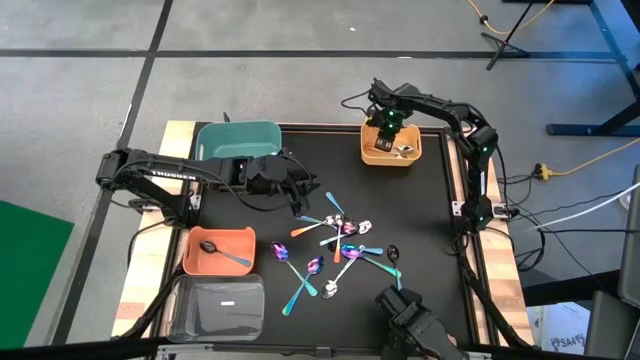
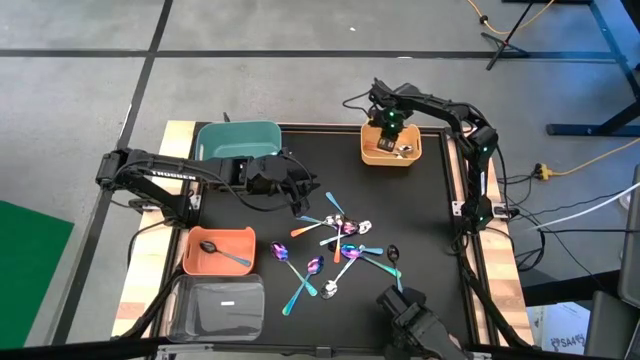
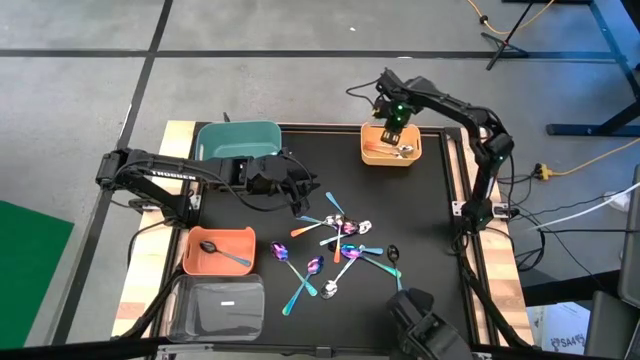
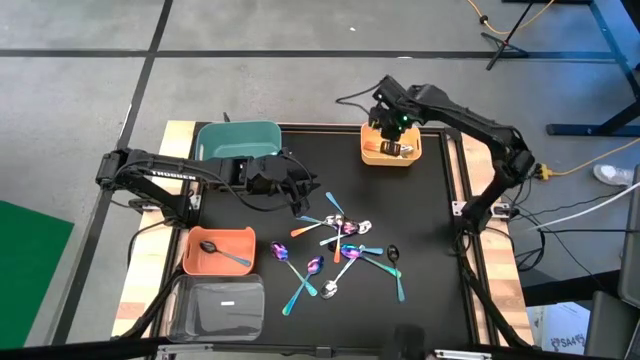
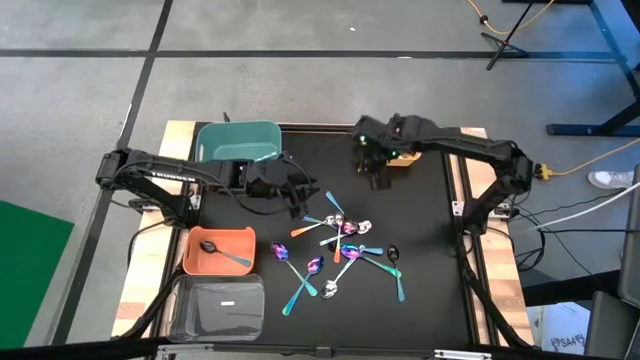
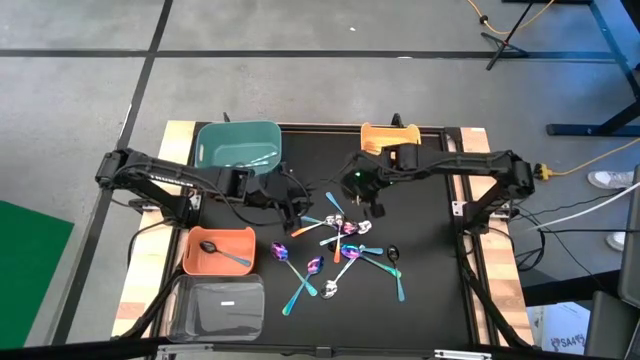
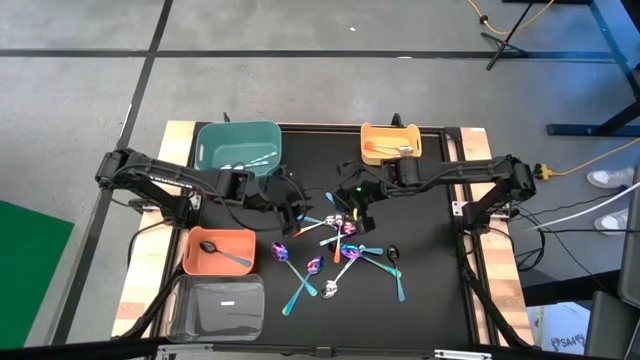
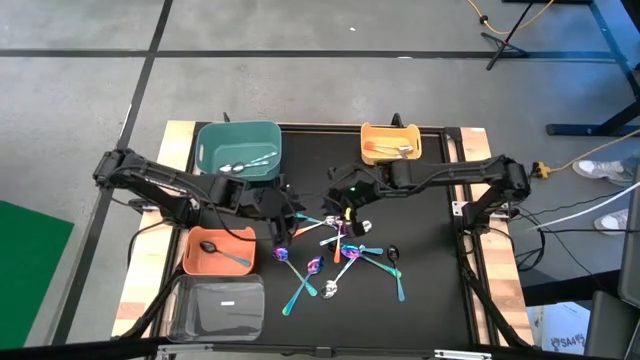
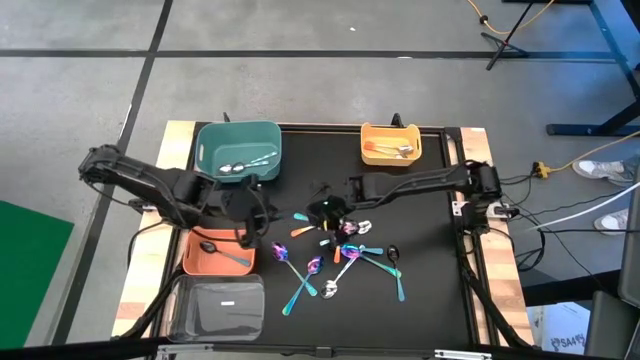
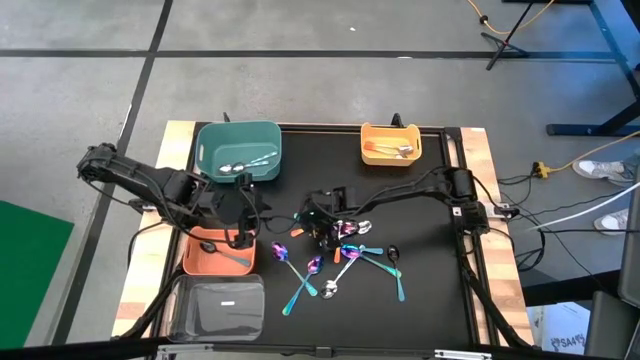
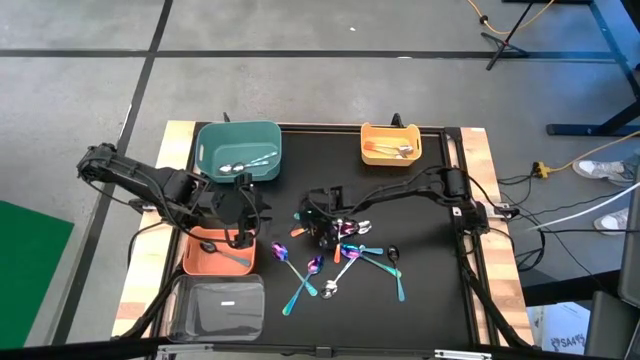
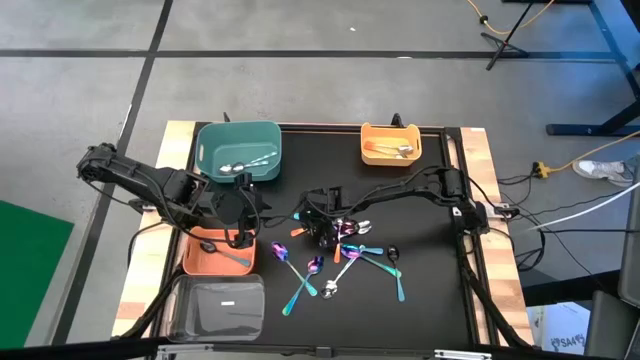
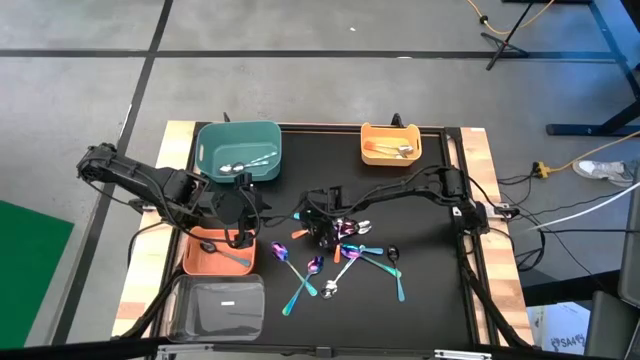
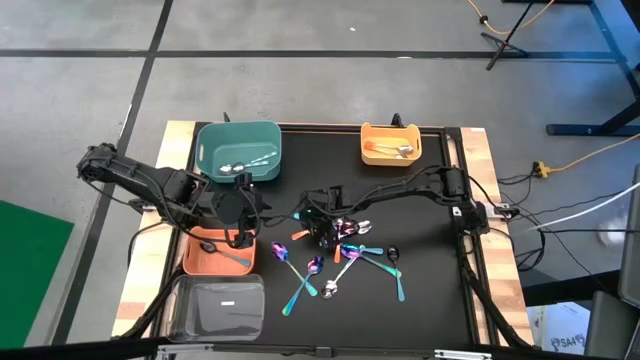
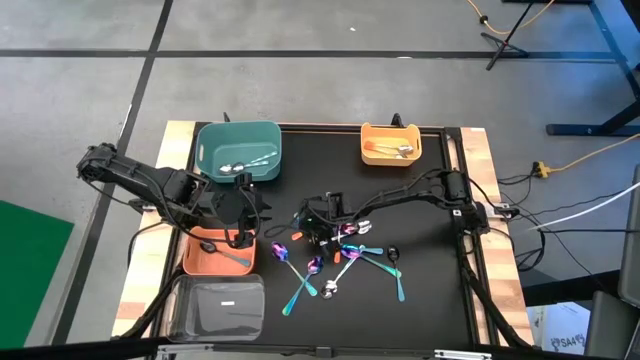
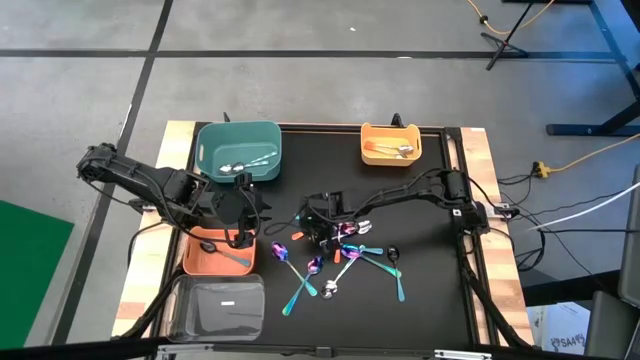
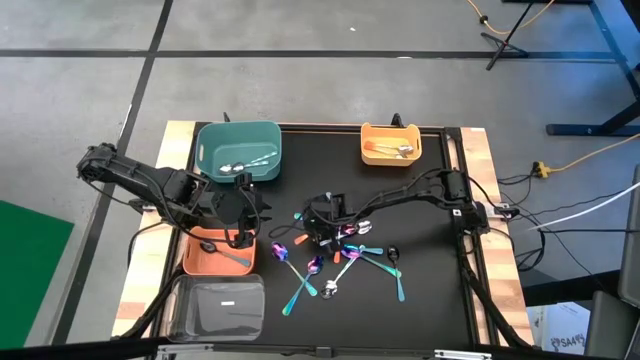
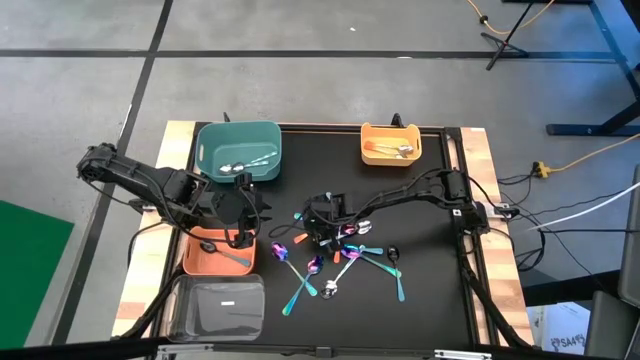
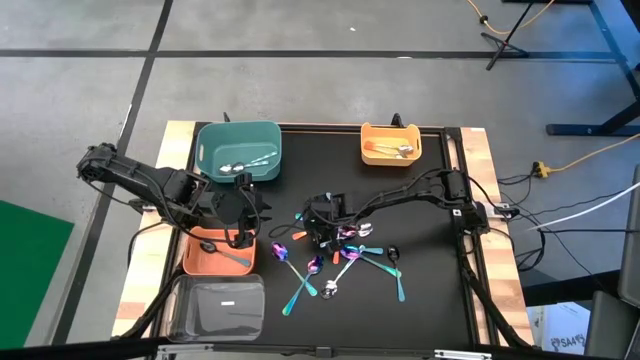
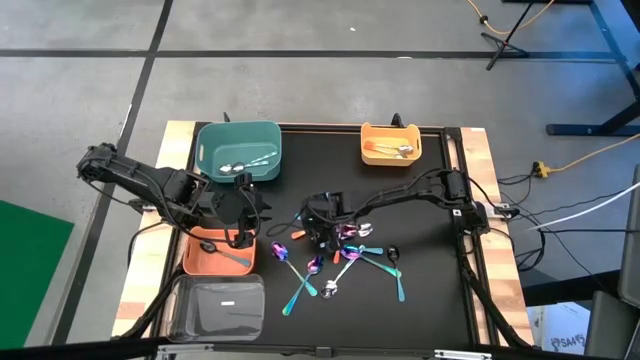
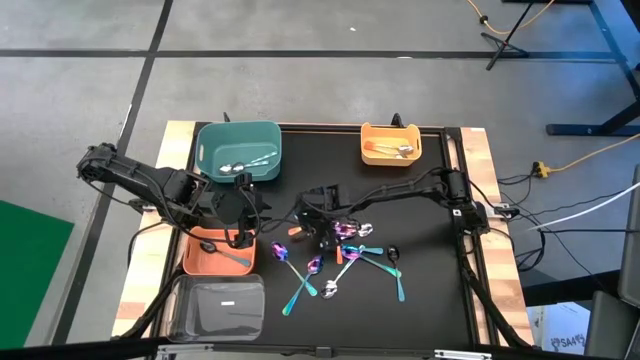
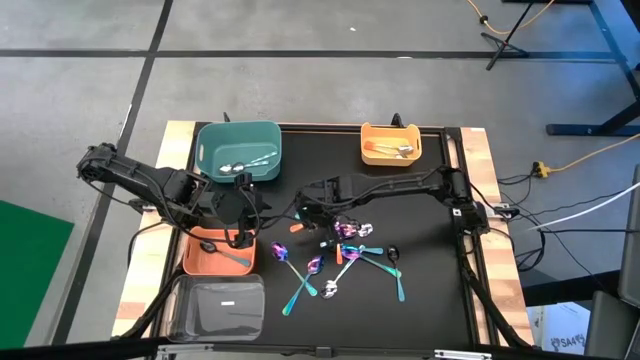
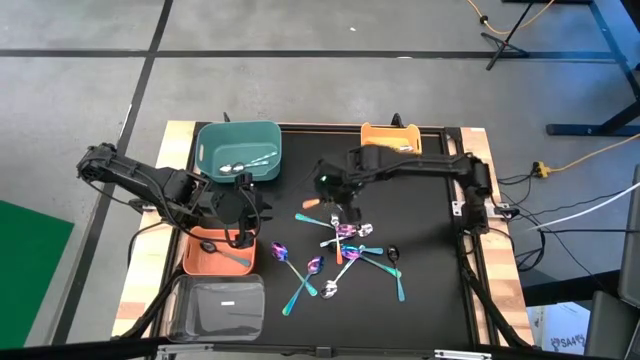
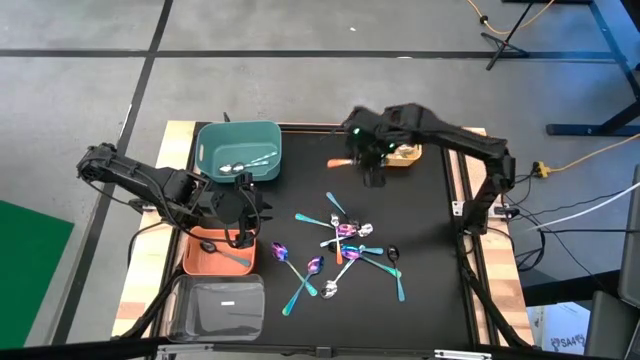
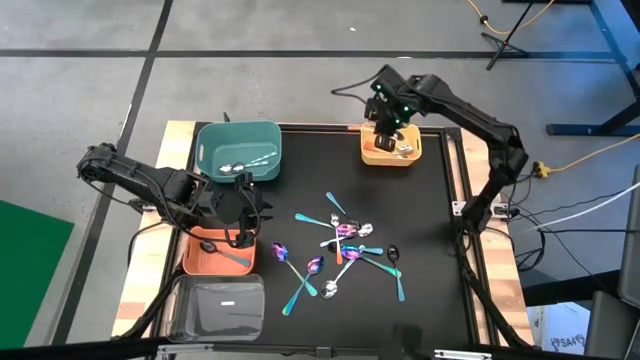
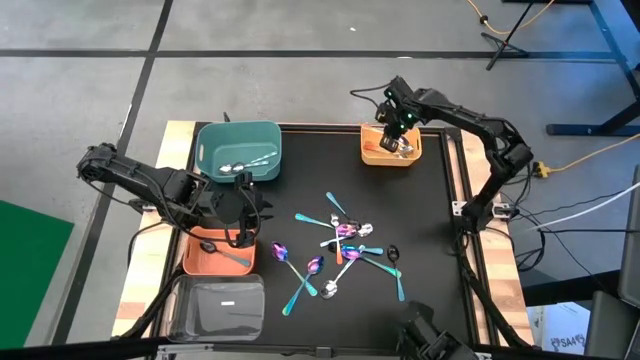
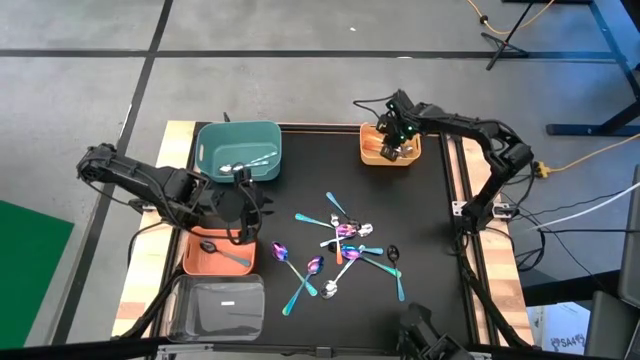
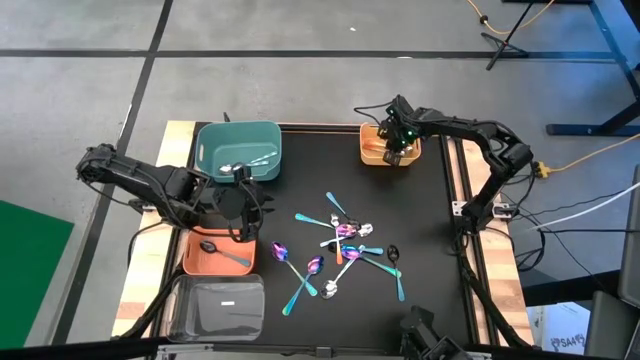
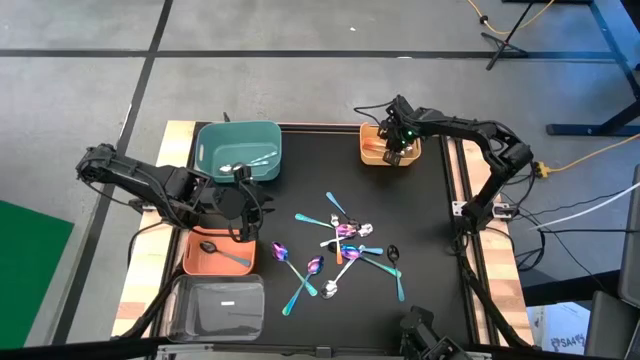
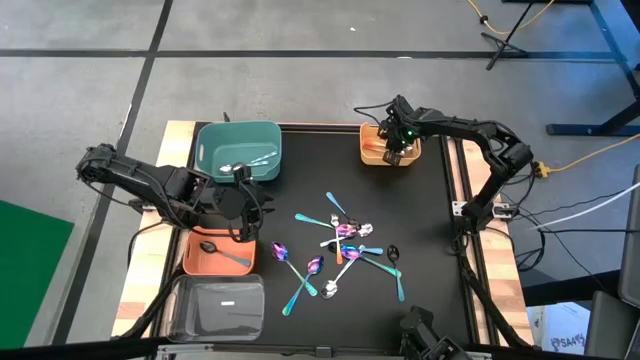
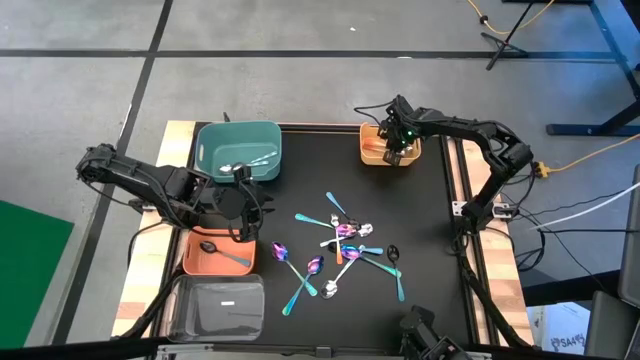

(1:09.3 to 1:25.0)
Task: Sort silverware by color (type)
Put the orange spoon into the yellow bin

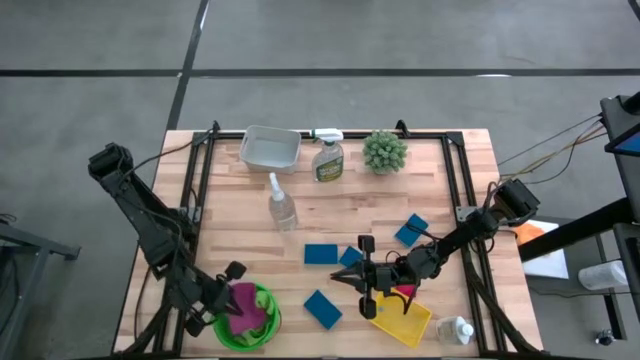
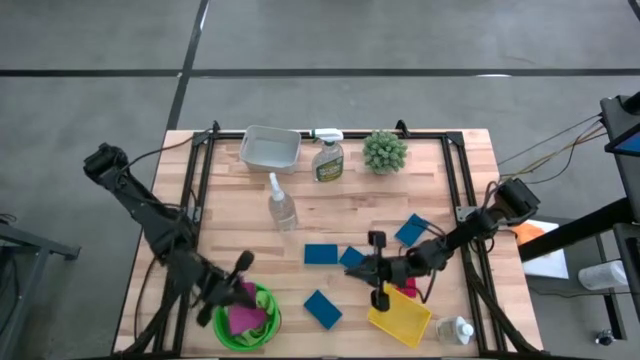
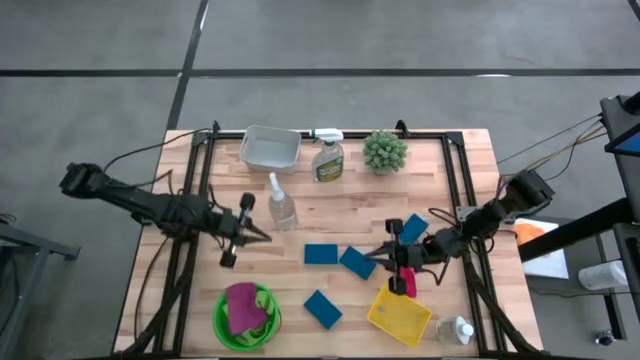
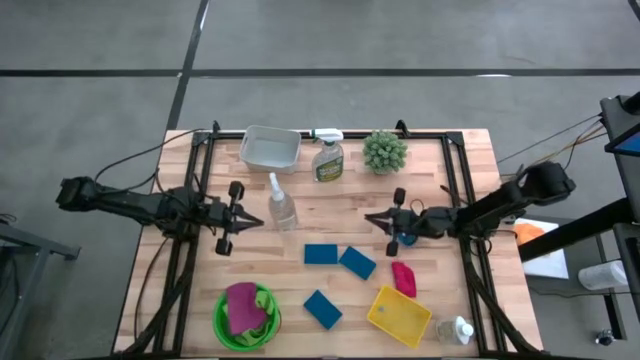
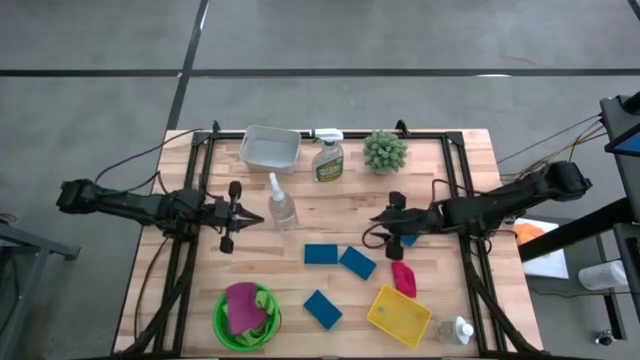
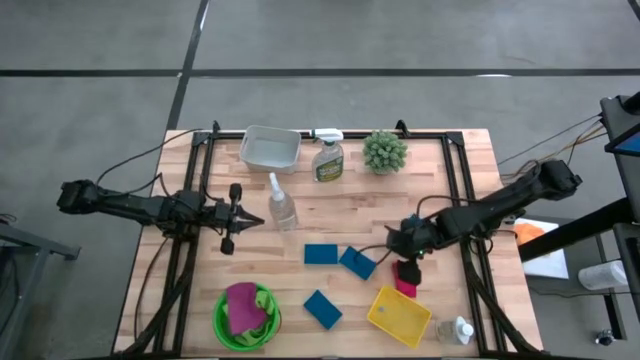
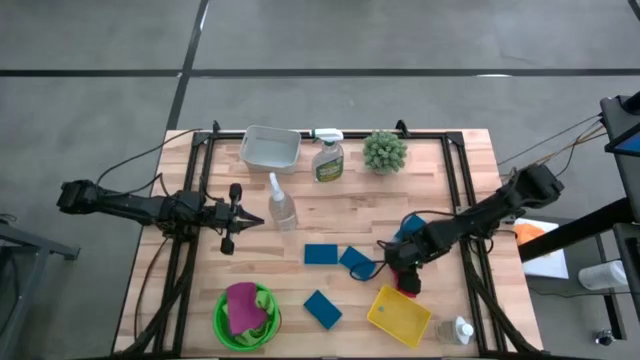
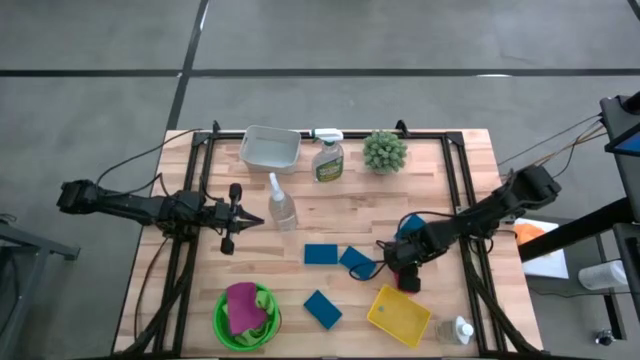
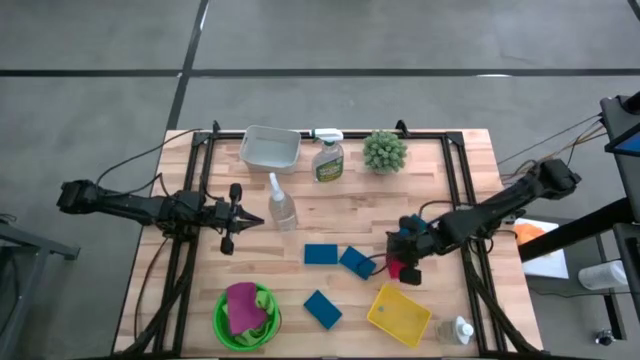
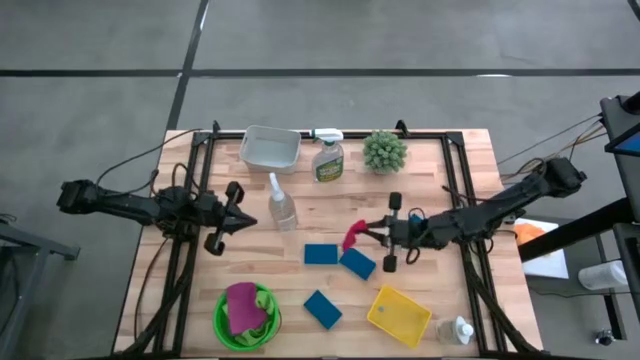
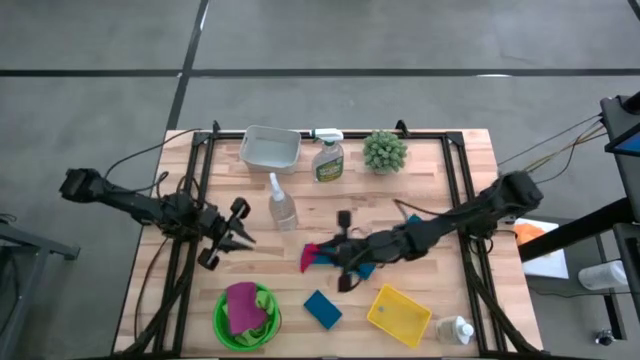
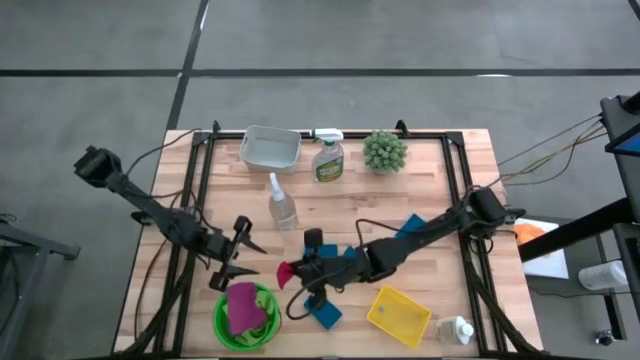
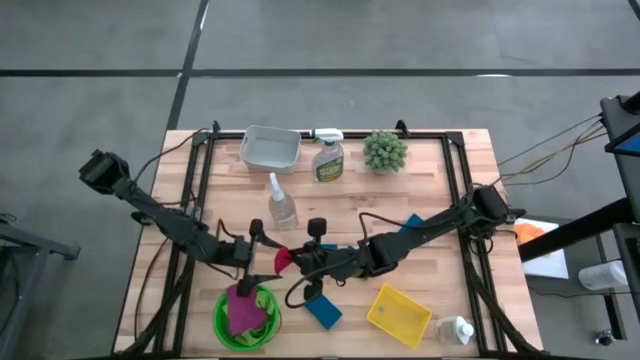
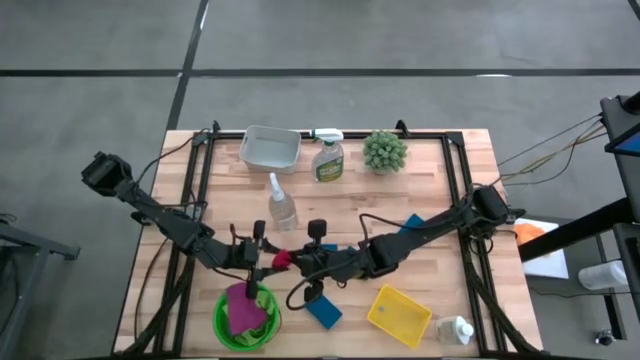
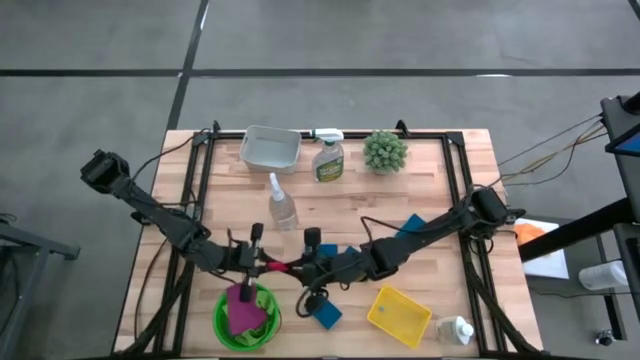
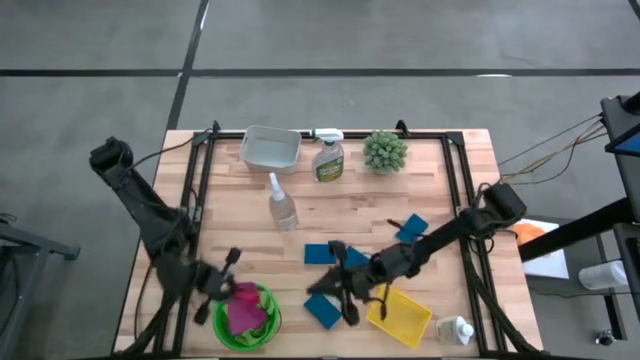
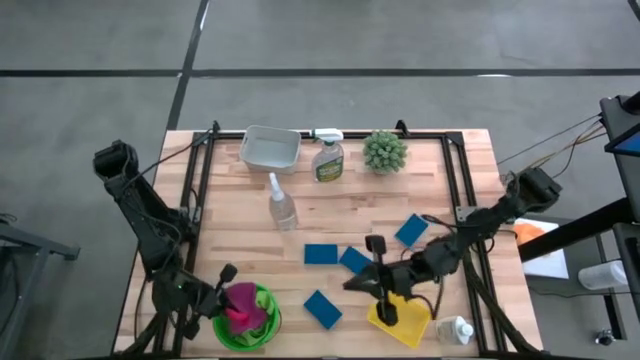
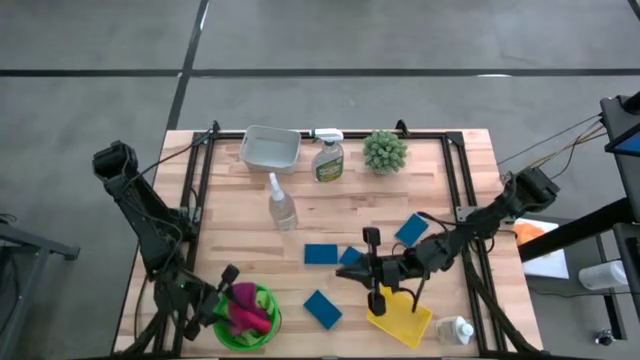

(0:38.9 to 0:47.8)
Task: Pick & Place Kitchen Items
Put the red microfiber cloth into the green basket
